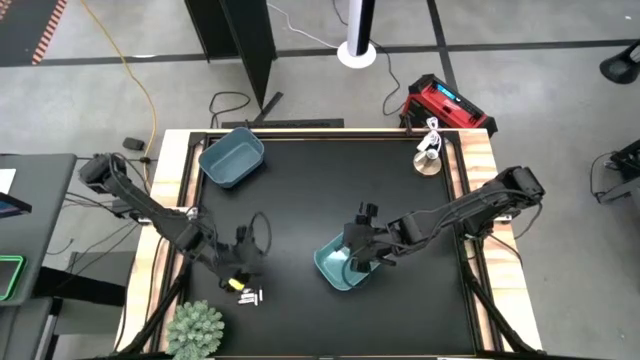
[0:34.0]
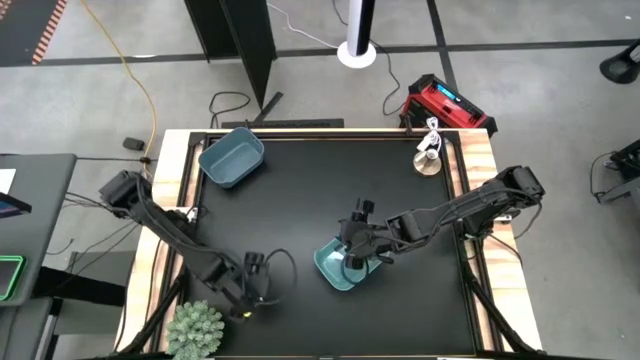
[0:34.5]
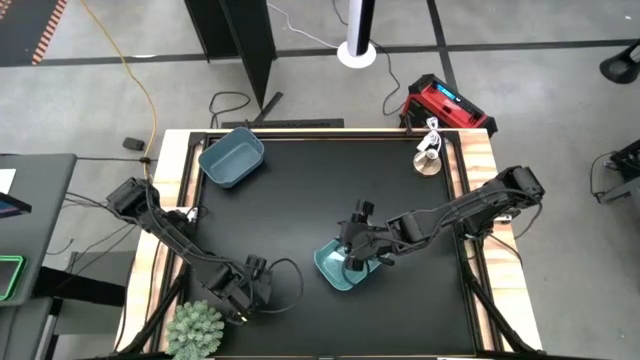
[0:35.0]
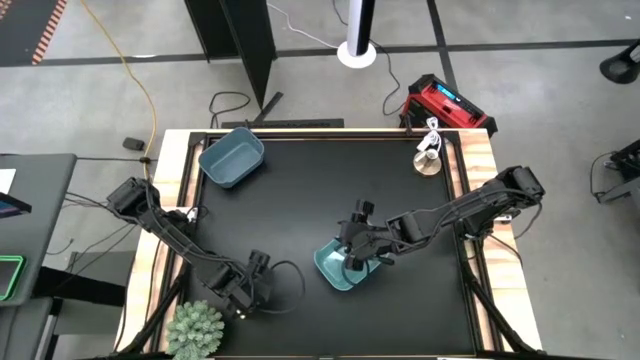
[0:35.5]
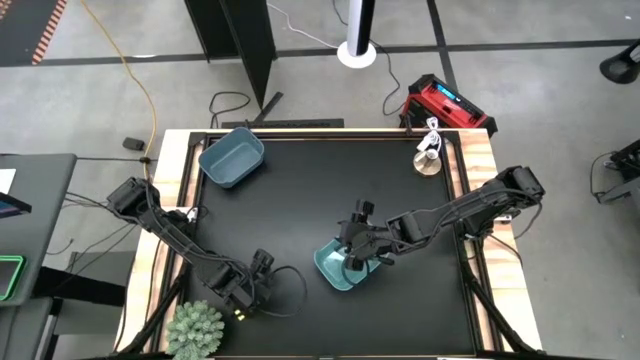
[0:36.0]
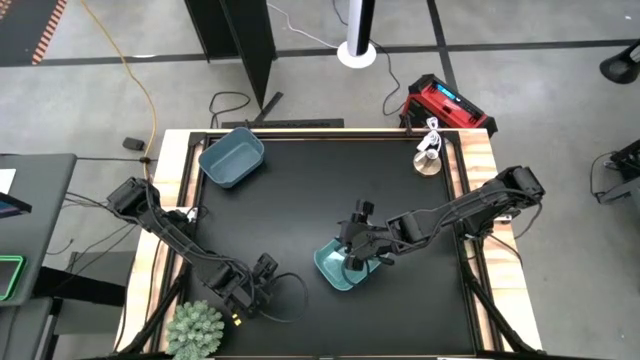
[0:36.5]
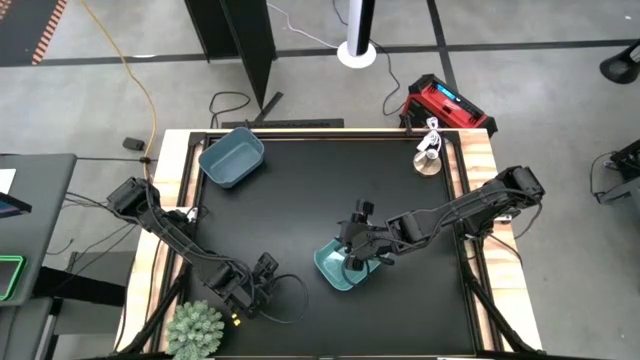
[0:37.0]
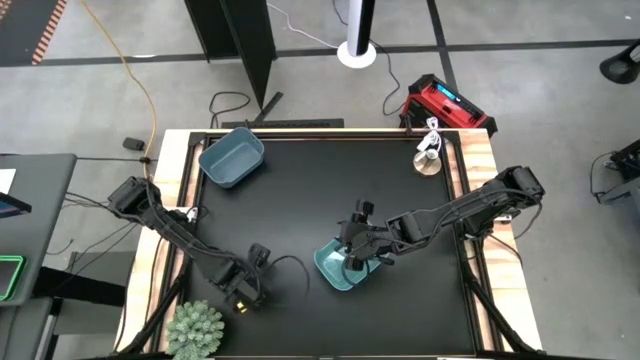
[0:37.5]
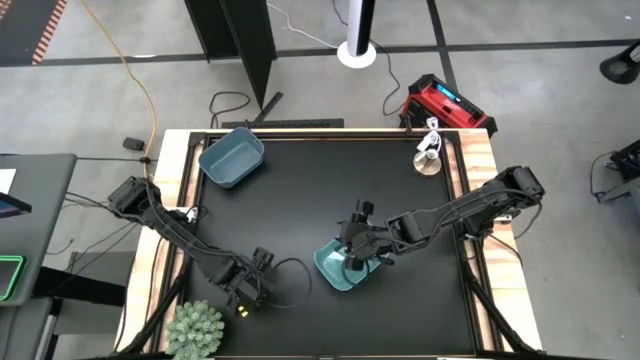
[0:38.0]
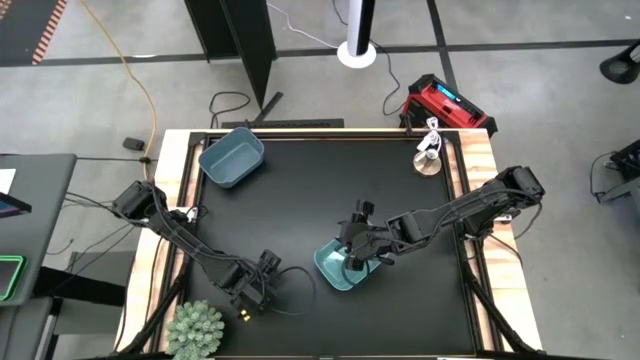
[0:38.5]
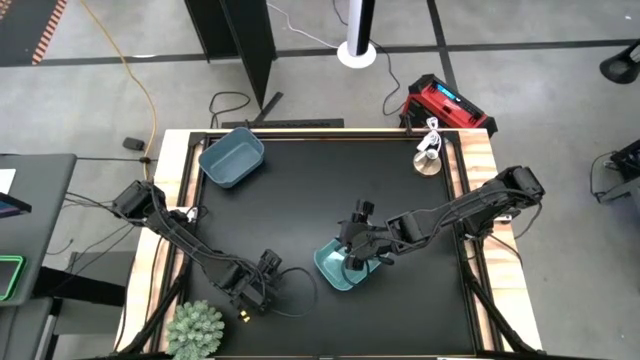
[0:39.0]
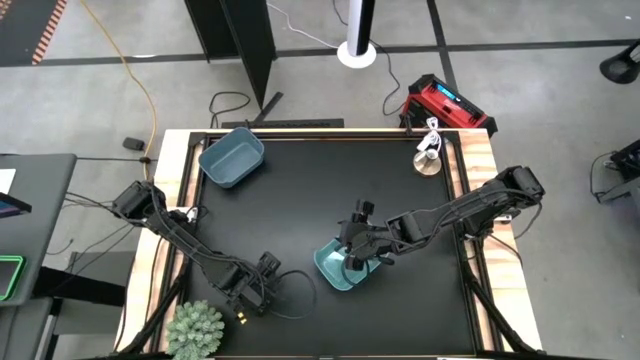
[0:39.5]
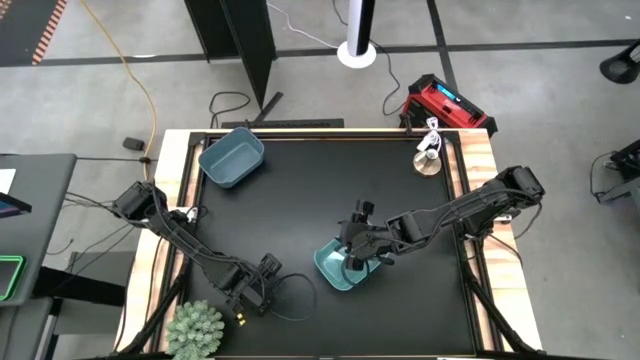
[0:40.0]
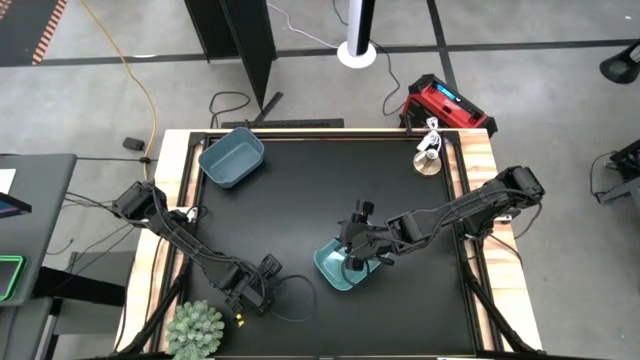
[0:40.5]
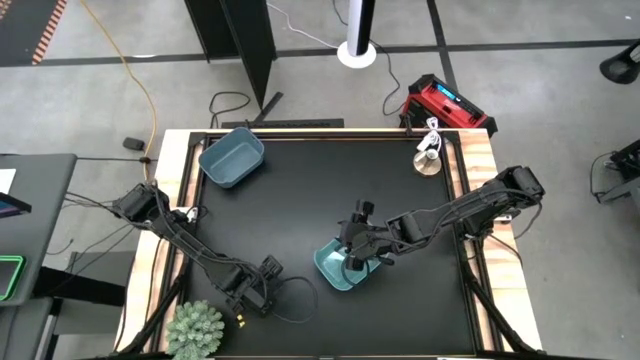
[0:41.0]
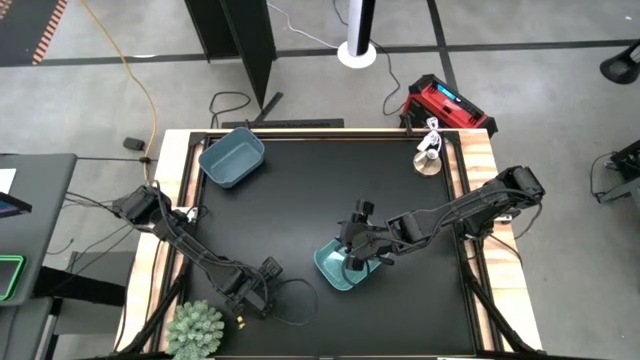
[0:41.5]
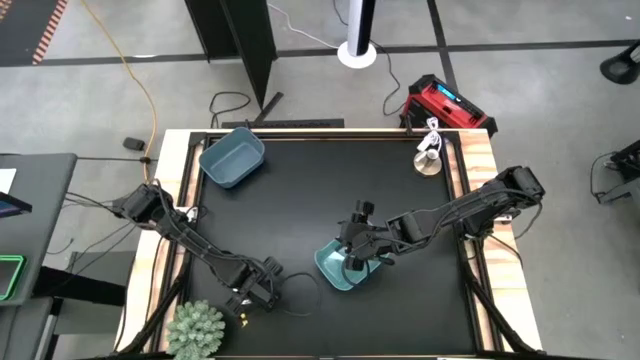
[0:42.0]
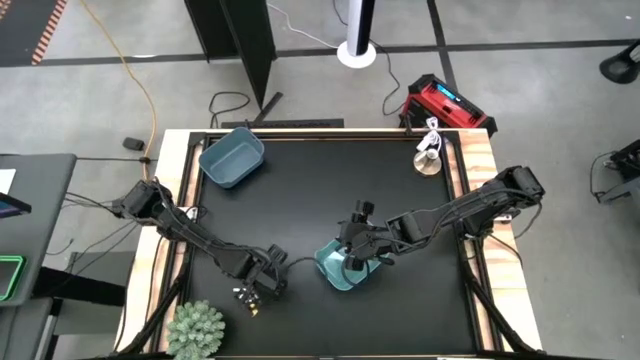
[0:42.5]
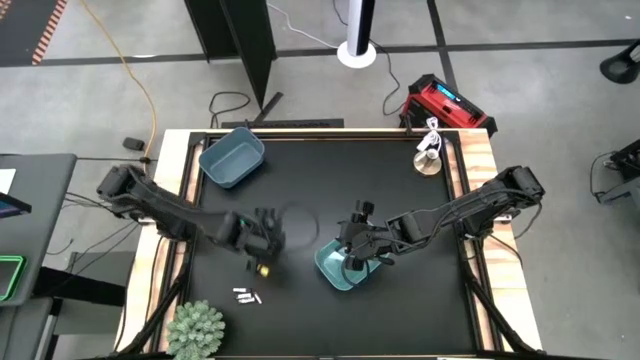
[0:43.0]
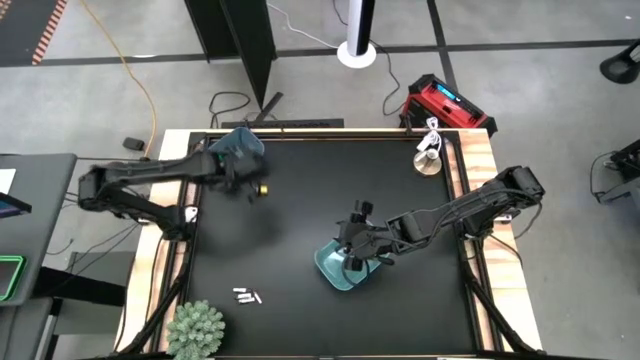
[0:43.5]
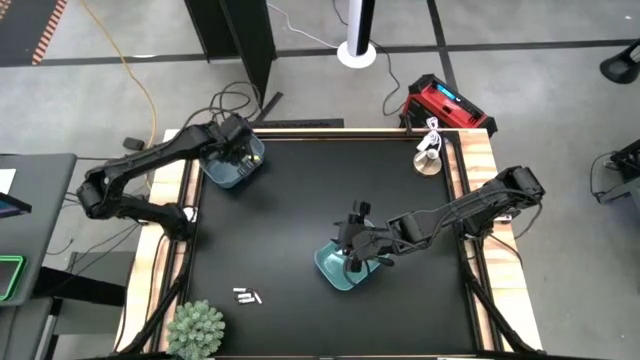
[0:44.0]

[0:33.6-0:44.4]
Task: Sort batteries
Put the silver battery into the blue bin

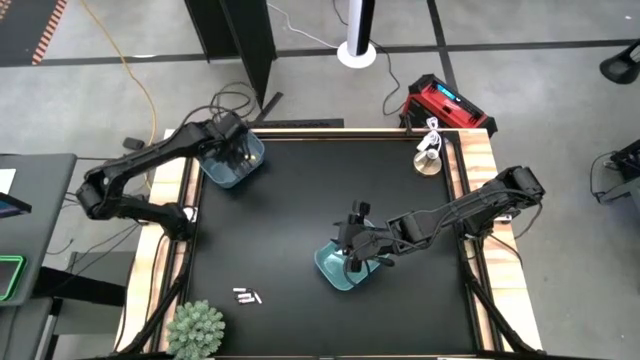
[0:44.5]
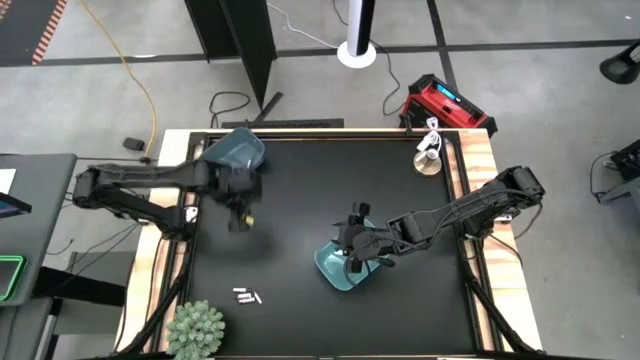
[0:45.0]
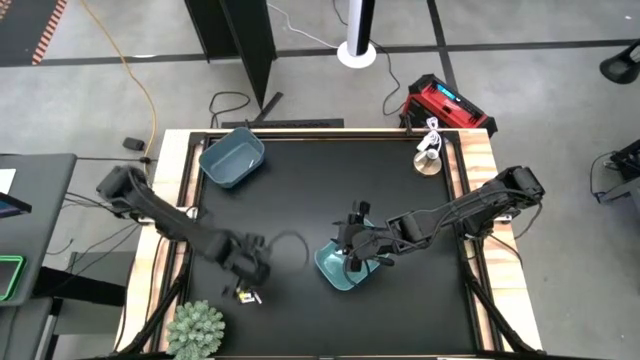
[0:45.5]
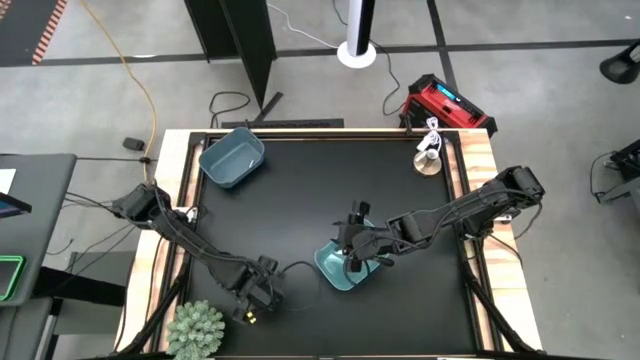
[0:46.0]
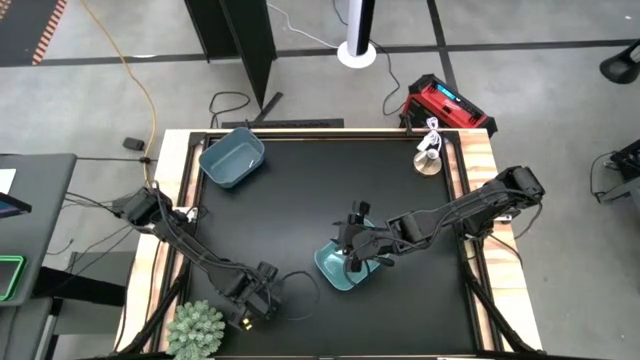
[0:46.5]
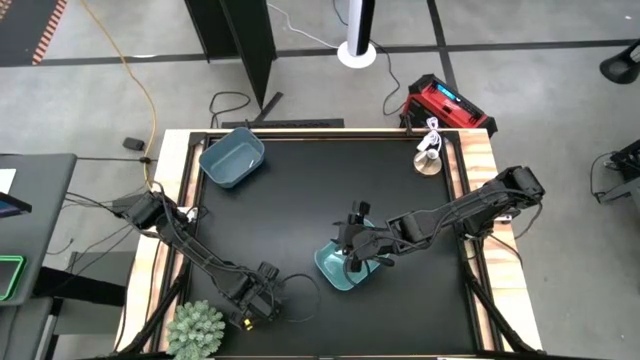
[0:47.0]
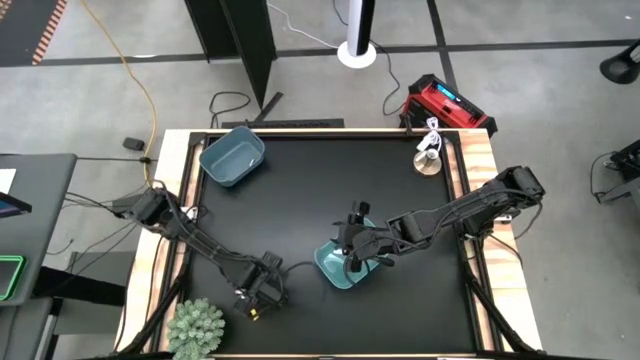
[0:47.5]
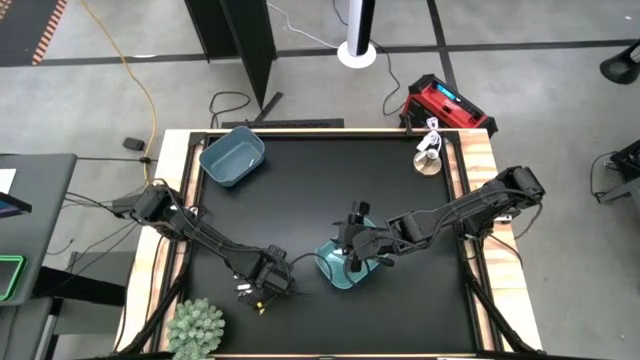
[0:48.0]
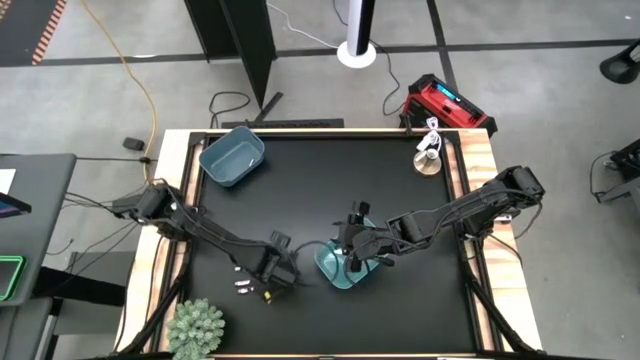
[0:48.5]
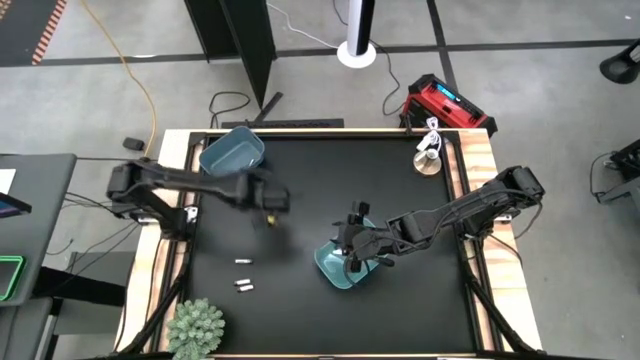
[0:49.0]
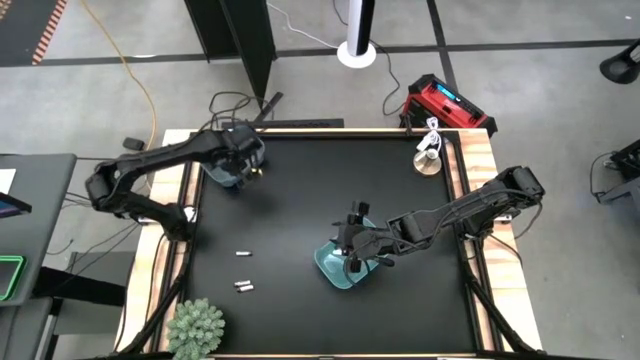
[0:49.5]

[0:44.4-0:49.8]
Put the silver battery into the blue bin

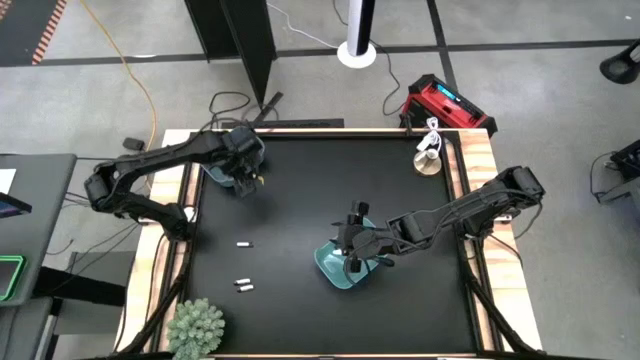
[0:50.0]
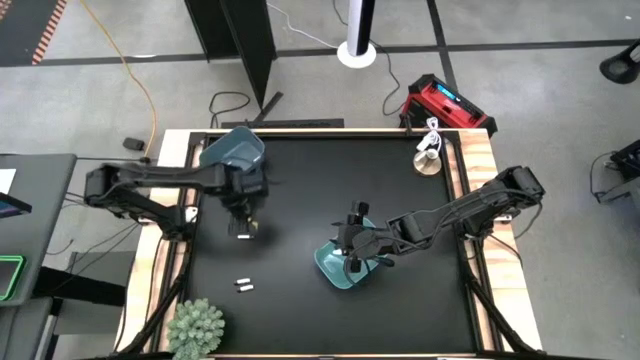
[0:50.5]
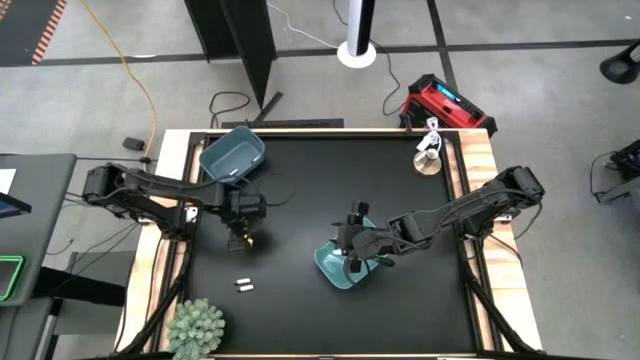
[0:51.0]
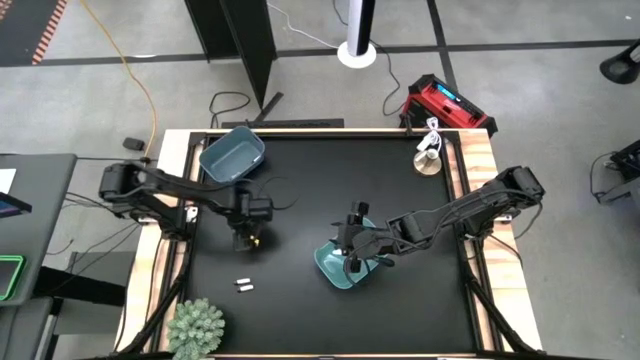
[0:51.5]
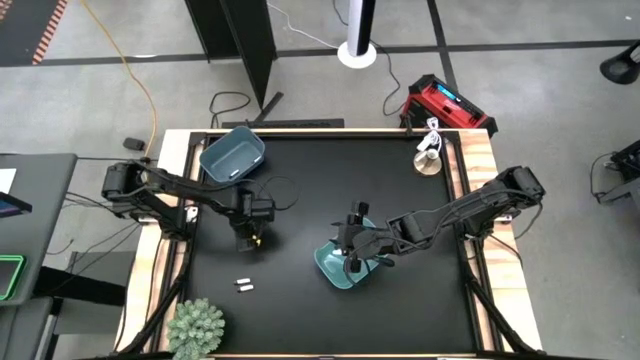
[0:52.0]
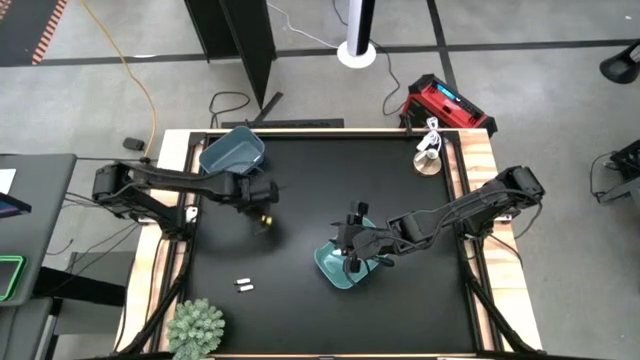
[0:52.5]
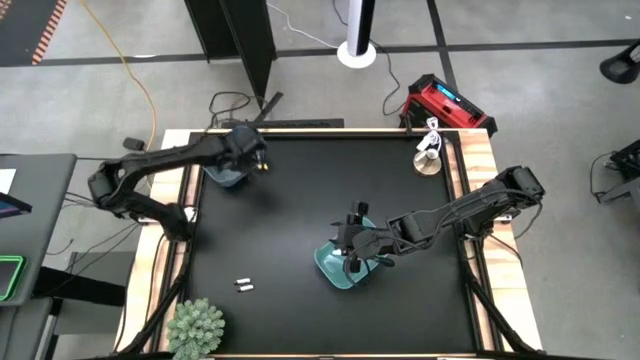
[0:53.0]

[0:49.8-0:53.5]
Put the silver battery into the blue bin

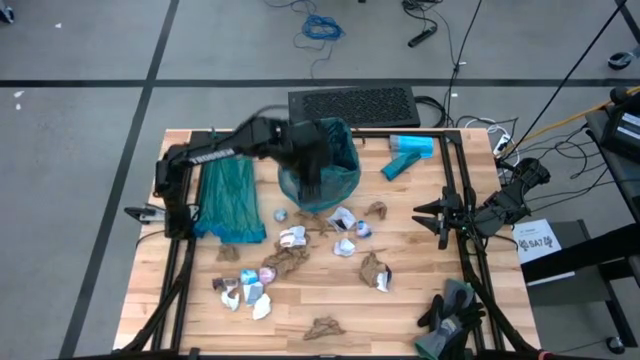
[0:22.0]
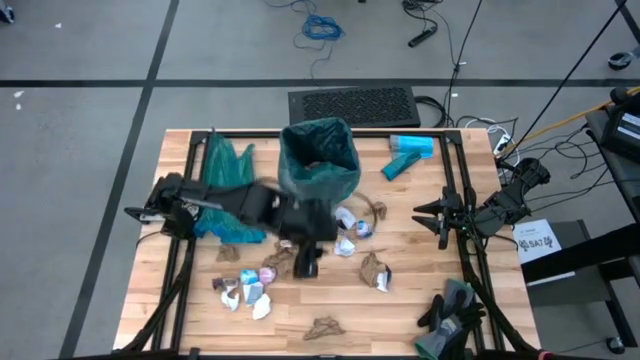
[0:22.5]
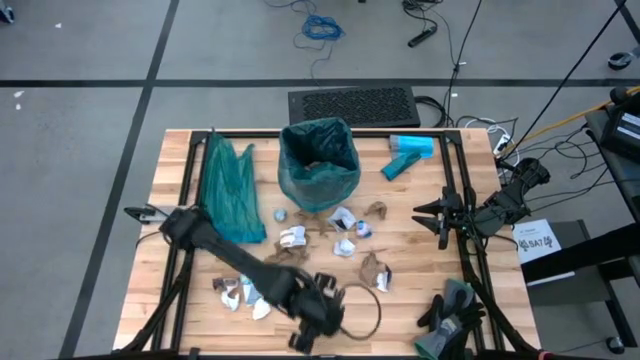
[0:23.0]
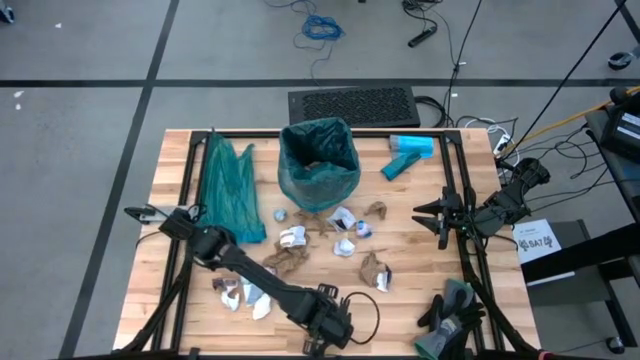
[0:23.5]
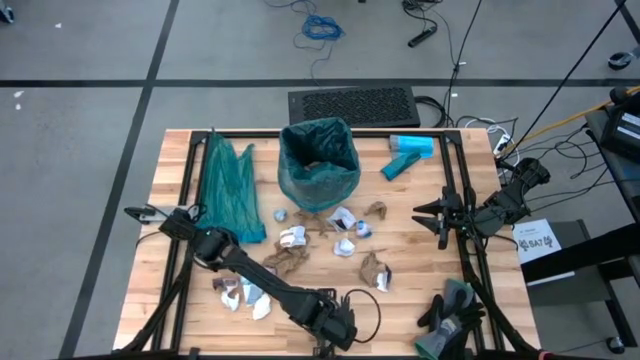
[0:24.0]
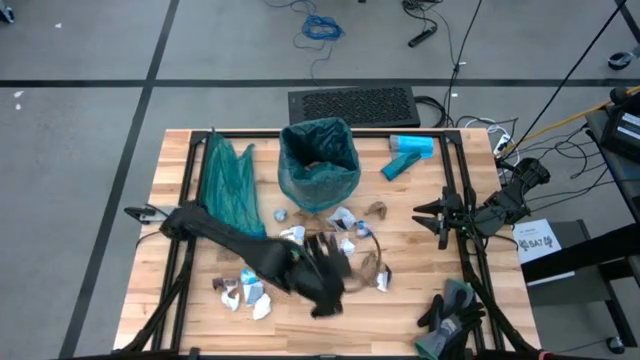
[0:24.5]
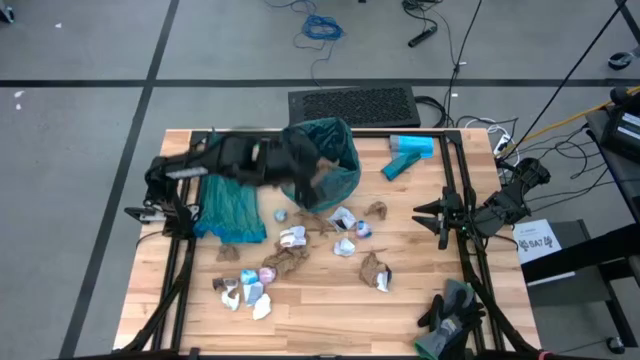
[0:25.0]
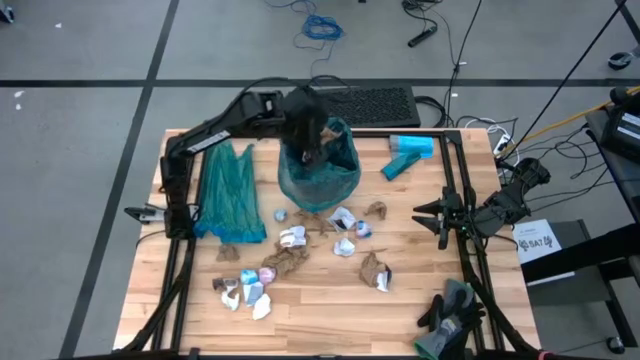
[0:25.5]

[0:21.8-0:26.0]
Task: place trash/remove bag and relplace
Put the brown napkin into the blue trash bag inside the black trash bin
